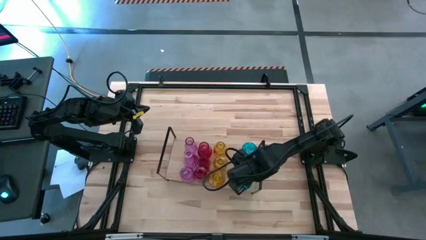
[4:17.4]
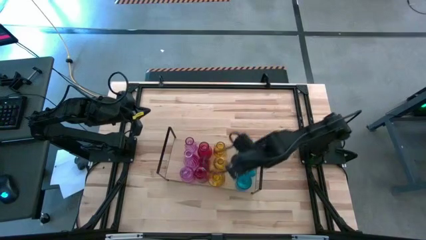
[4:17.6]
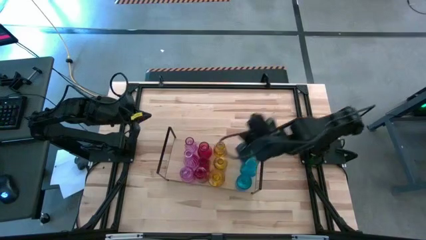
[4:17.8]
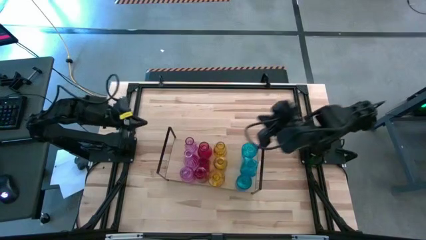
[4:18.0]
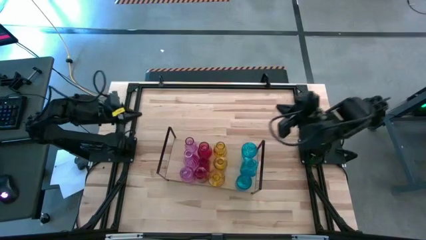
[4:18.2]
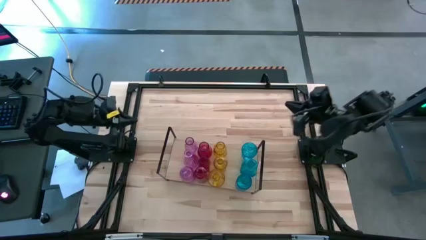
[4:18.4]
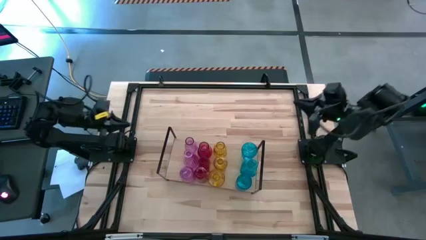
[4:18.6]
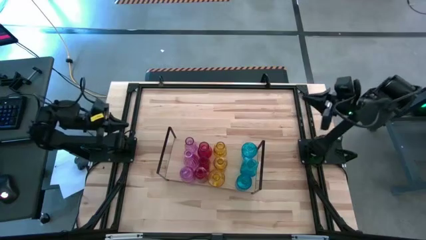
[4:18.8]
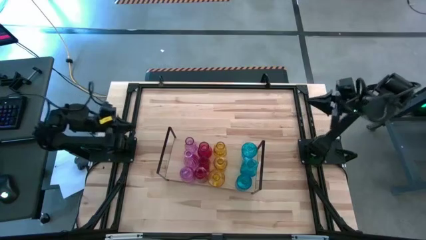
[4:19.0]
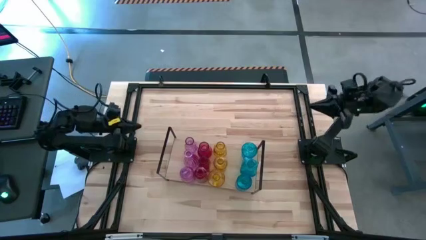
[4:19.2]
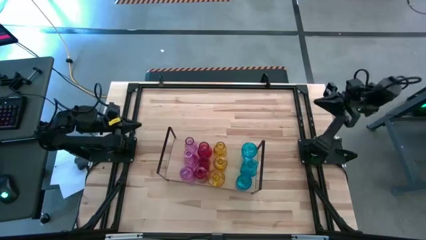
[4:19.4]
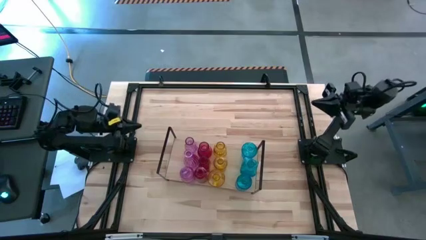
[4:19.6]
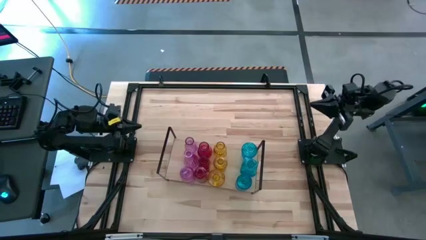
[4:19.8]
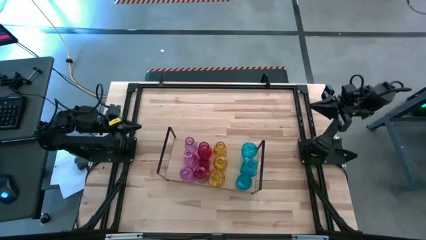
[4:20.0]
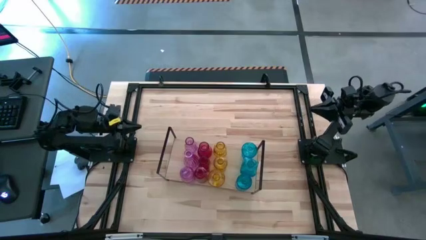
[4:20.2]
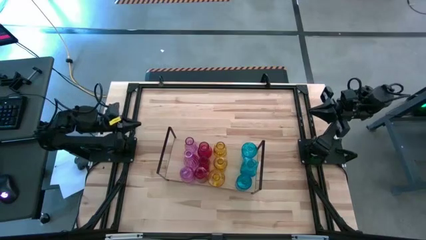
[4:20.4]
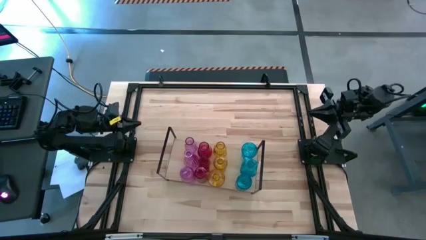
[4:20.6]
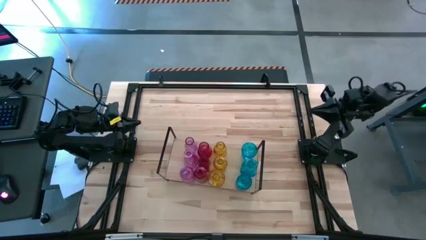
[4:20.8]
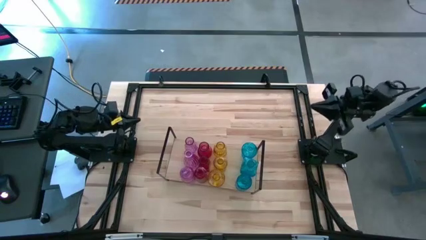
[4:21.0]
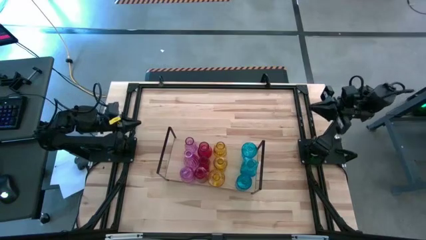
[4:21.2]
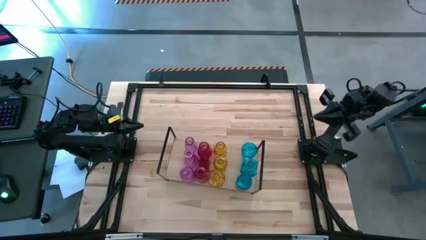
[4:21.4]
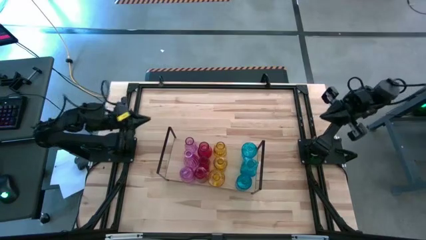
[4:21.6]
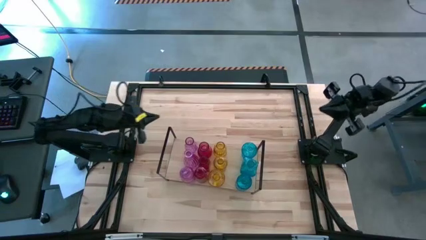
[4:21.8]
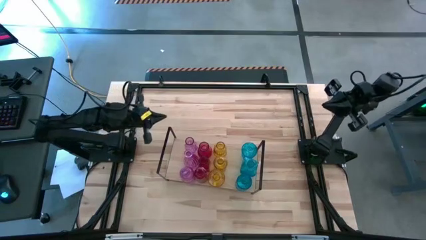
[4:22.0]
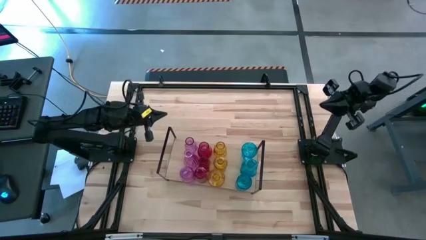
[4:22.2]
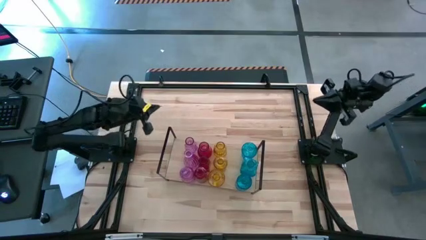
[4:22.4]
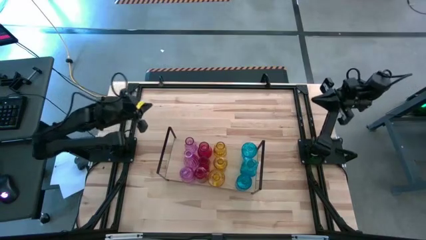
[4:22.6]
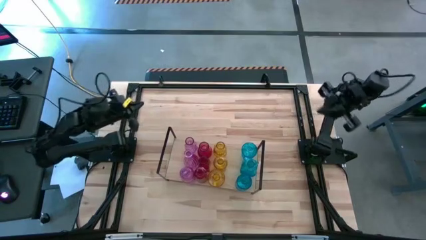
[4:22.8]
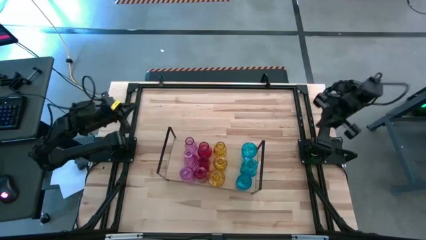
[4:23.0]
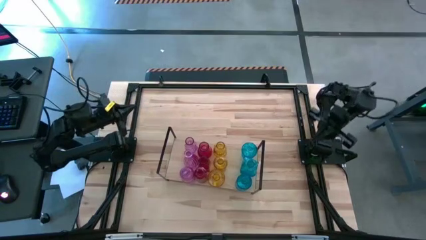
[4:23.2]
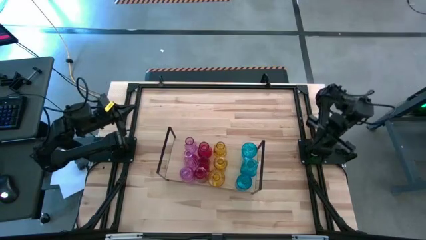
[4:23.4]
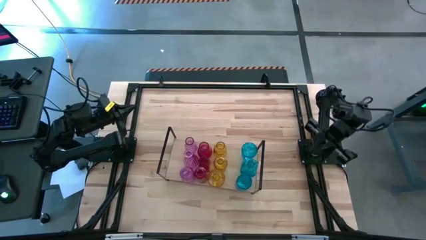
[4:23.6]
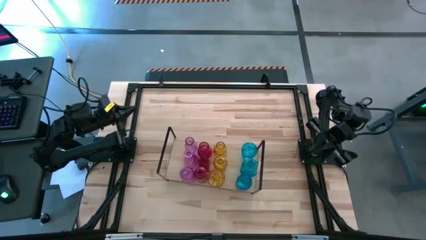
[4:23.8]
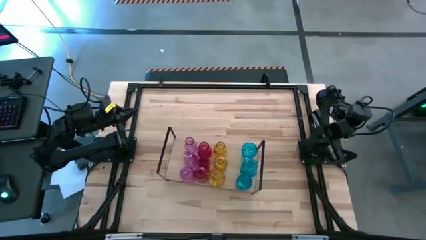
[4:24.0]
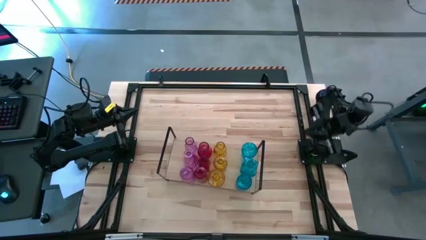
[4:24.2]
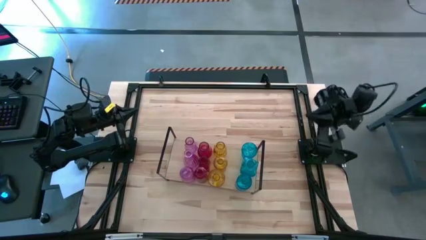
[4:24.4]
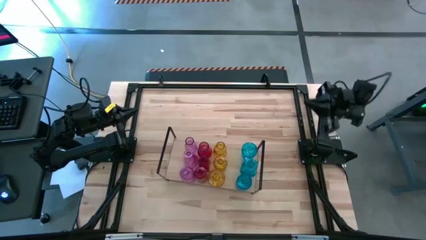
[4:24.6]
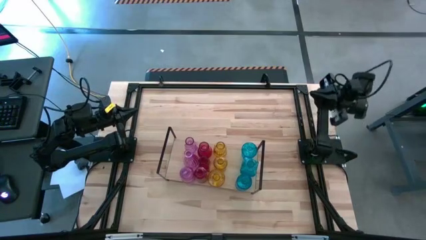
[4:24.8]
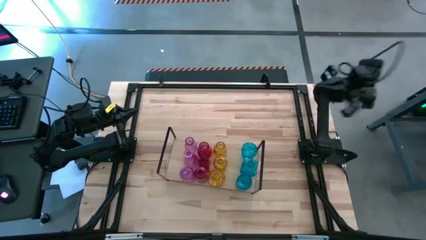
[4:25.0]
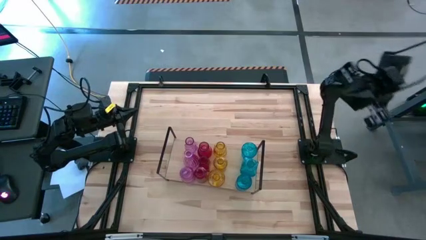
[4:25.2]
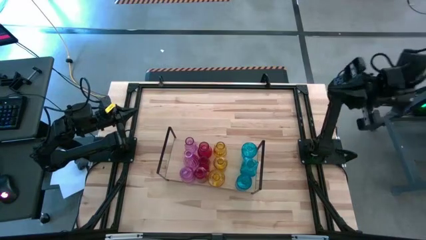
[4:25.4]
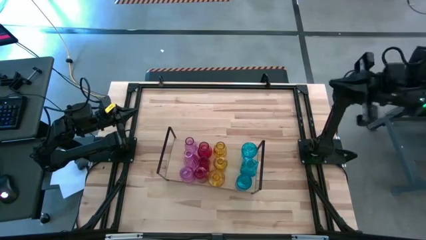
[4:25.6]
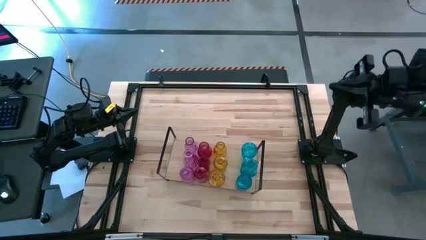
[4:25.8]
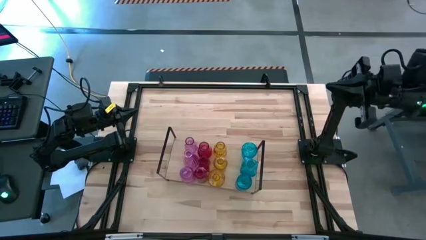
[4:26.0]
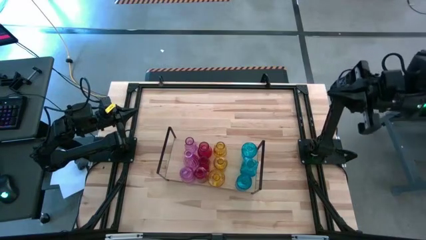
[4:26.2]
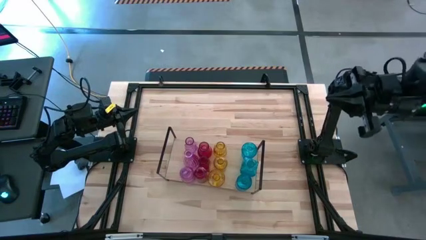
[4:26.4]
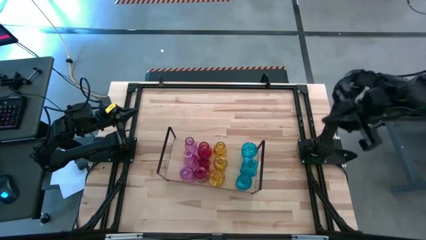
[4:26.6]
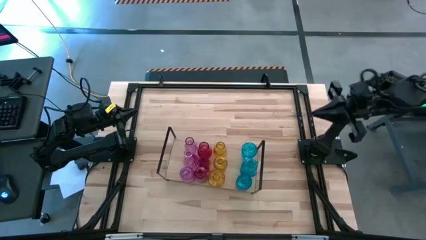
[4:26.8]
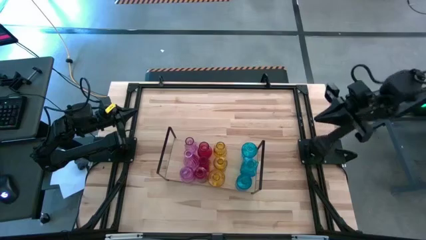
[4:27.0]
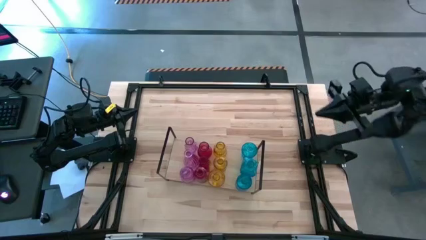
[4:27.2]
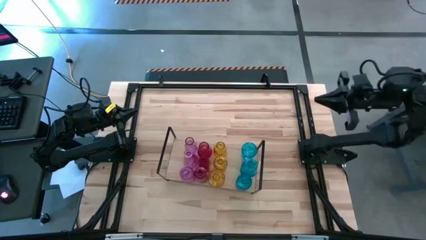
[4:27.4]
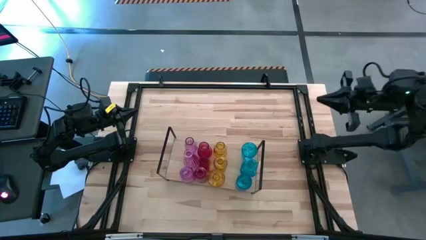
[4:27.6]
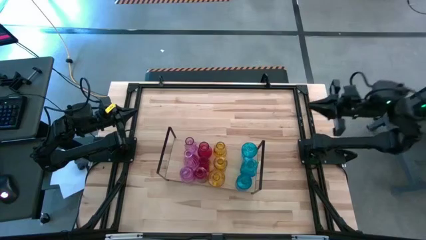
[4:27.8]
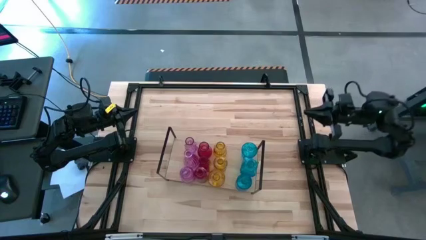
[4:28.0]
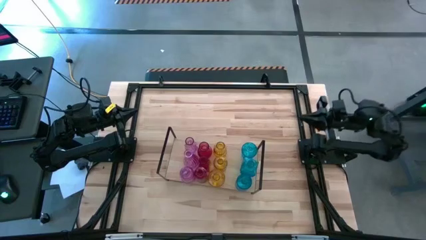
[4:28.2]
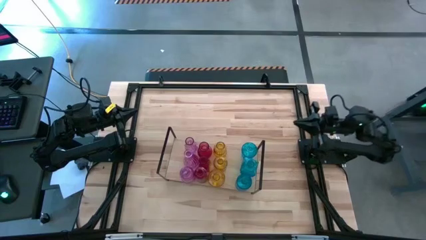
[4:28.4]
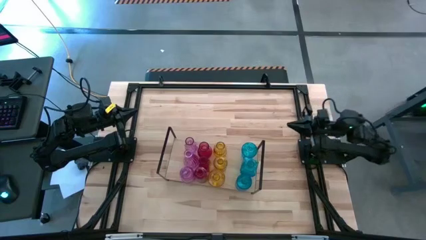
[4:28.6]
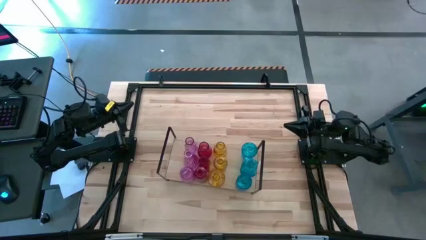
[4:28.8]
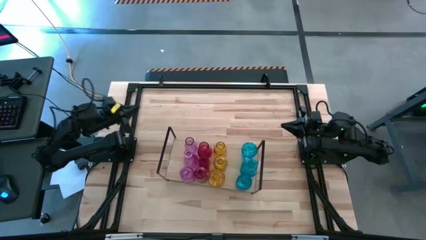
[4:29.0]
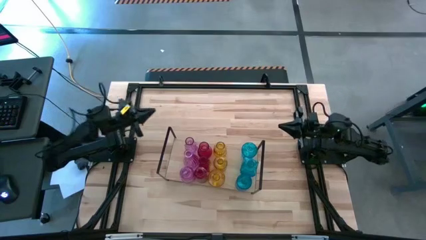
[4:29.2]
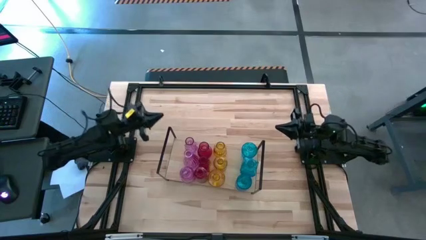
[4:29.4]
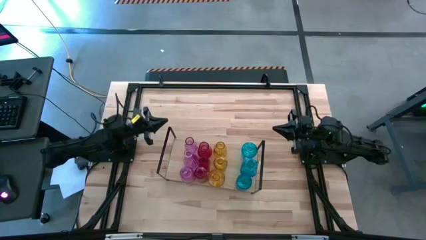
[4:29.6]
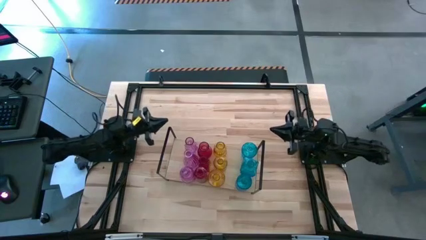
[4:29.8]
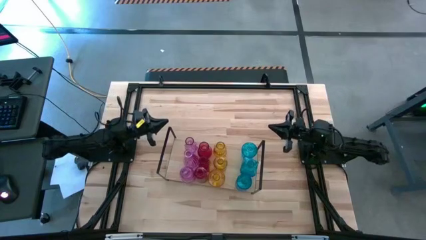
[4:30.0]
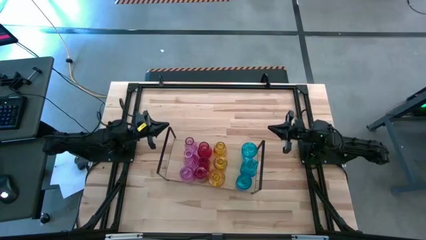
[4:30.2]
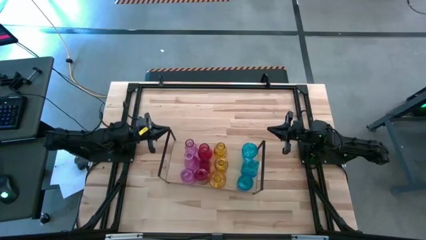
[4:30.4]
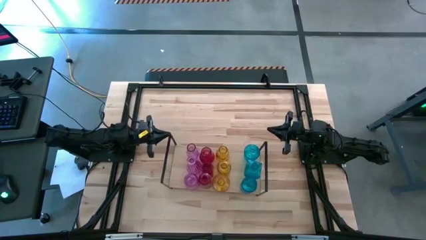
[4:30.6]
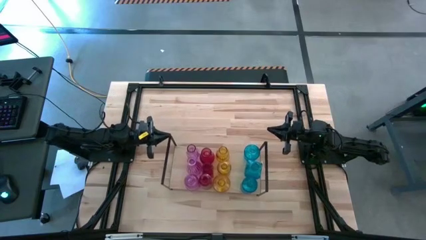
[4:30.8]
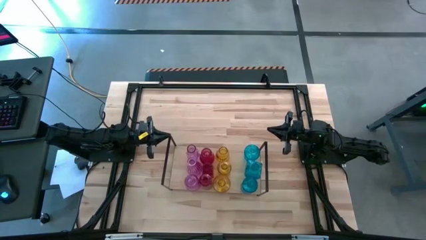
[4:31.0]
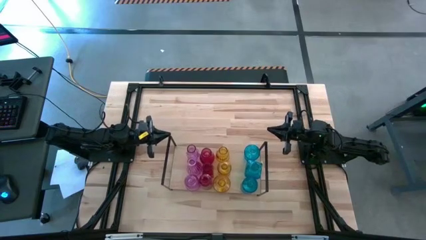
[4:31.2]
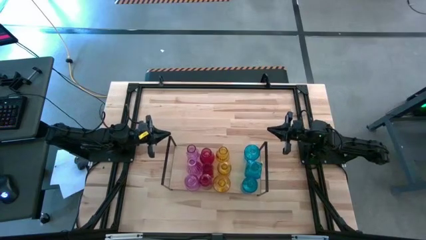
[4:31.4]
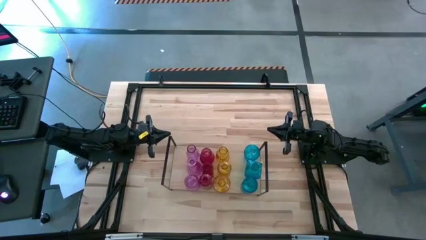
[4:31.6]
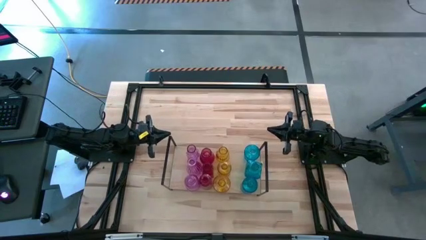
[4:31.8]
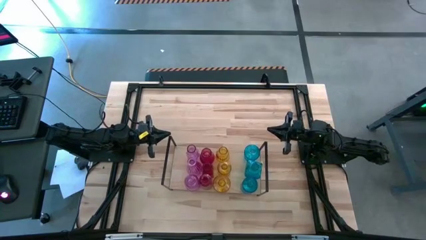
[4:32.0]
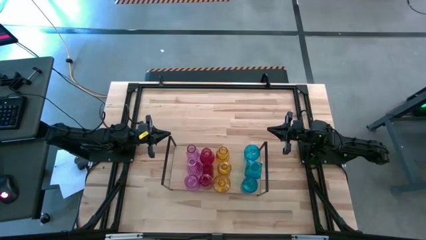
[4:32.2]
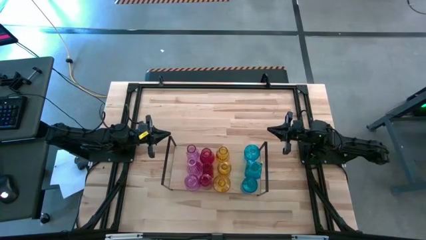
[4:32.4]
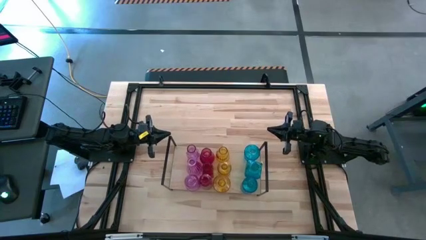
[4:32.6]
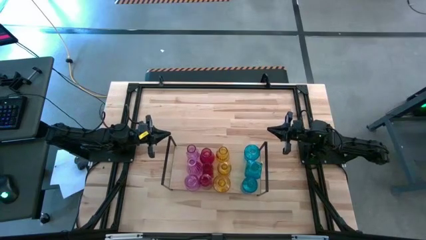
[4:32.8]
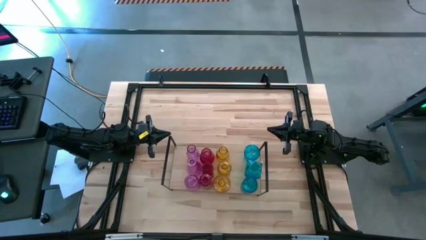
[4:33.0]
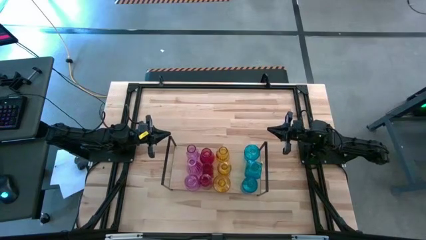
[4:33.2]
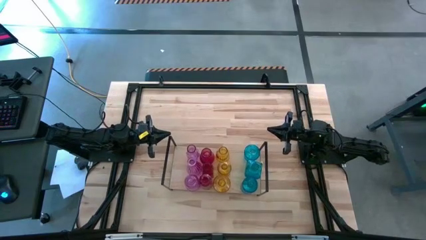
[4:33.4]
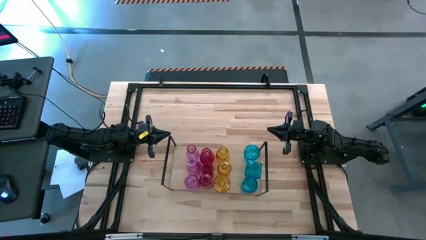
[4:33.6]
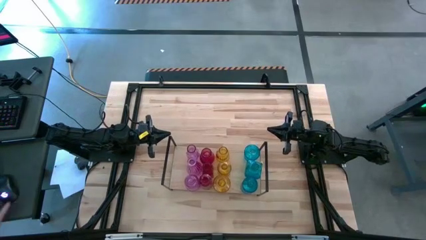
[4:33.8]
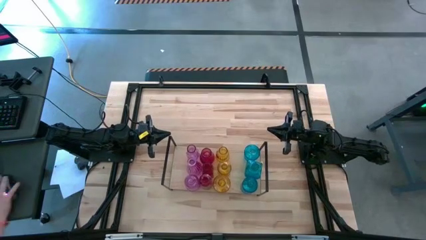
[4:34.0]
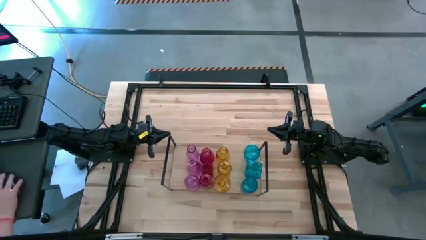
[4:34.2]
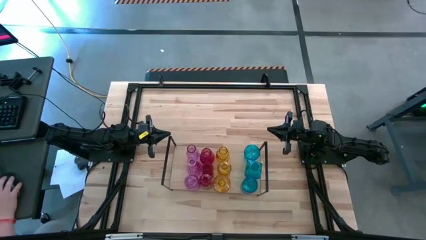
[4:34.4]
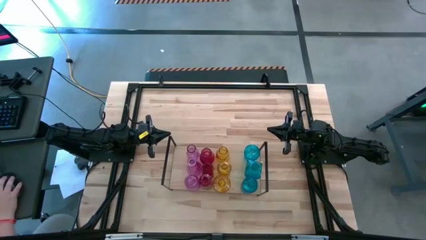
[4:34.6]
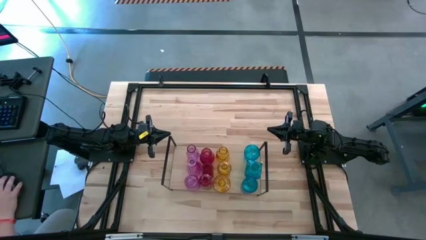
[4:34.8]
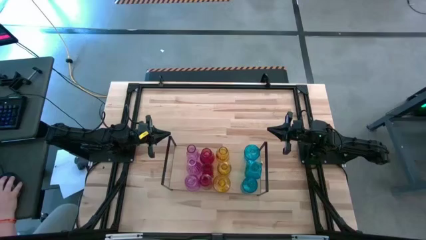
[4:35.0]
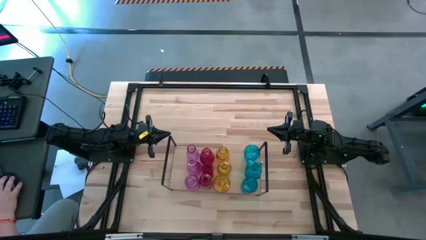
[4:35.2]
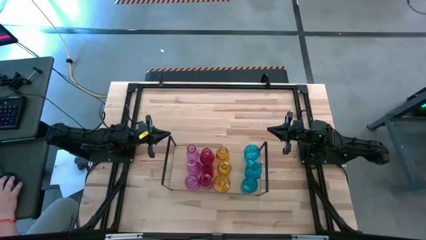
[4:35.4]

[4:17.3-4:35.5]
Task: sort vases onto shelf
Return to Home Position
